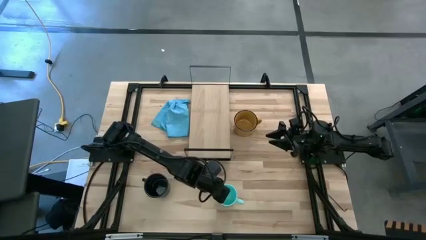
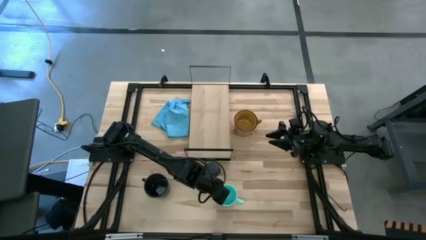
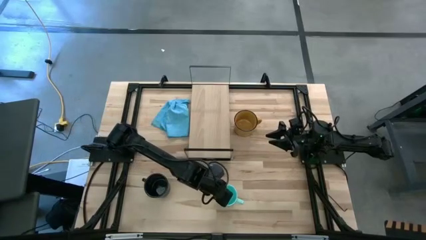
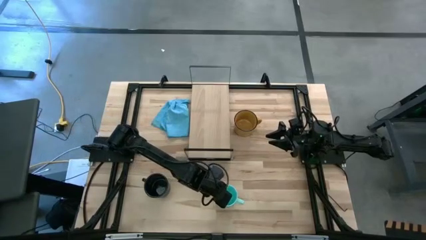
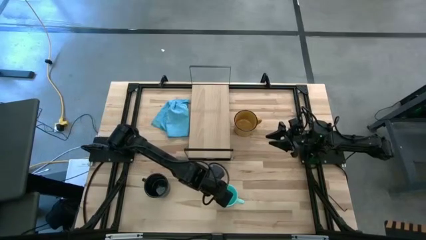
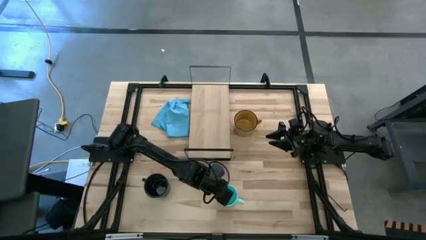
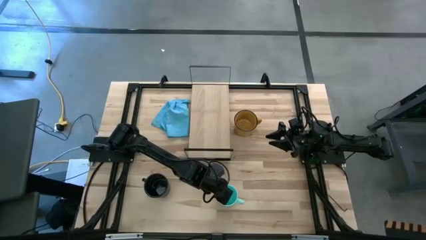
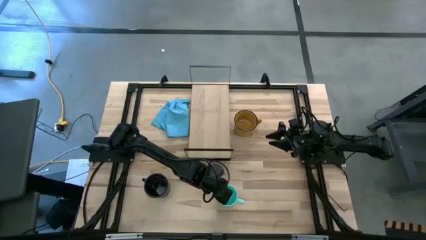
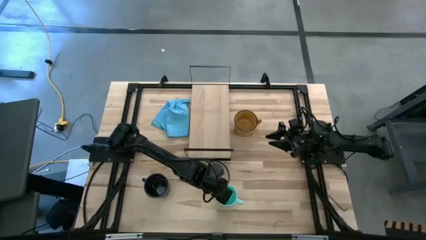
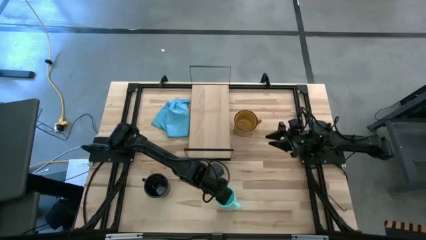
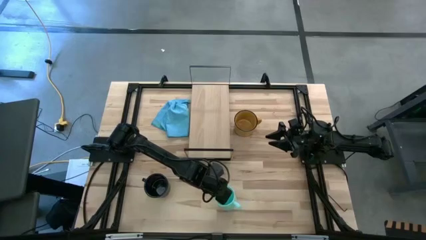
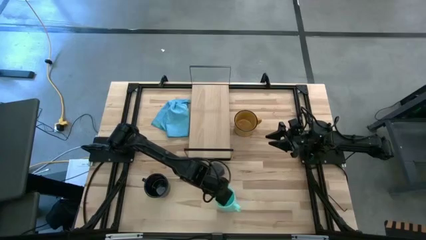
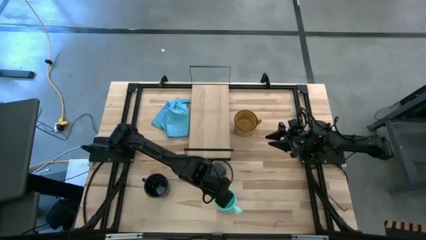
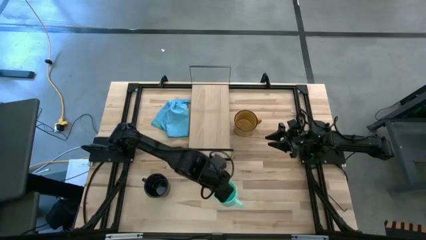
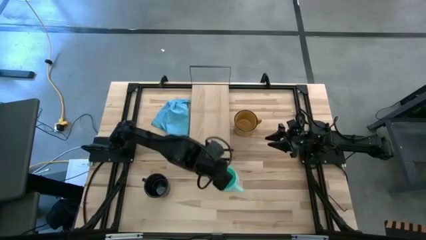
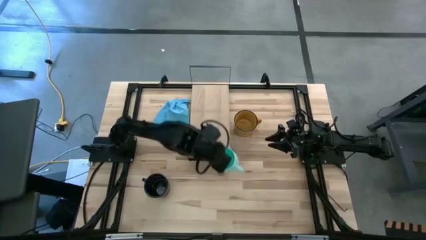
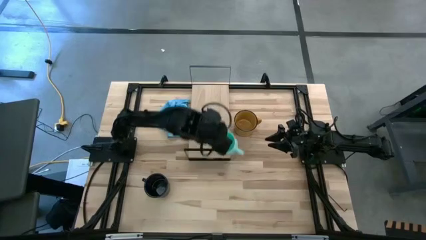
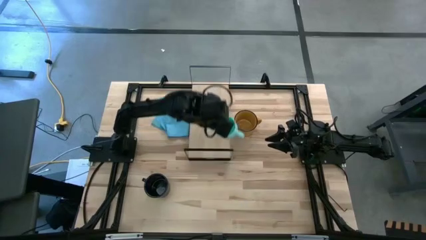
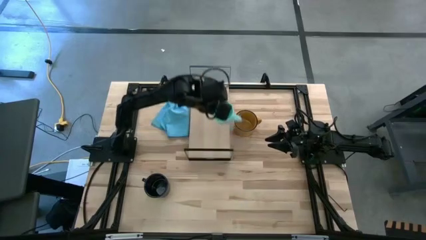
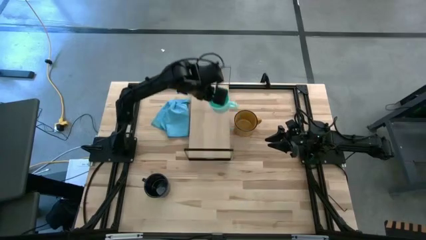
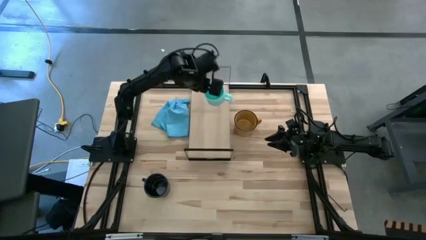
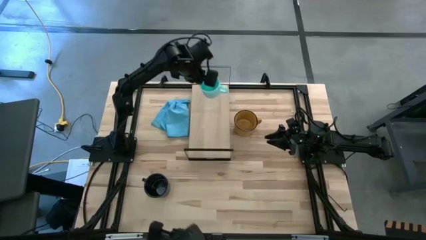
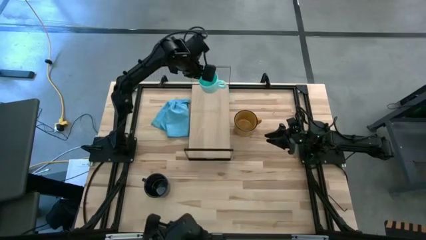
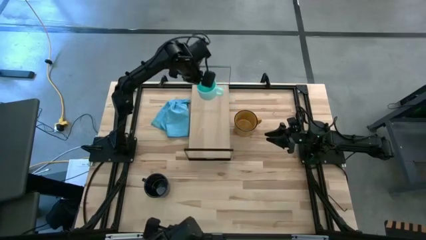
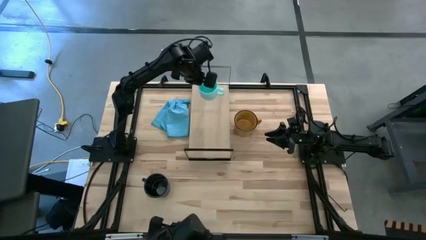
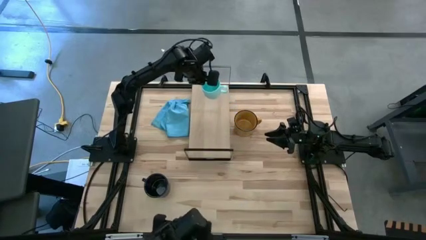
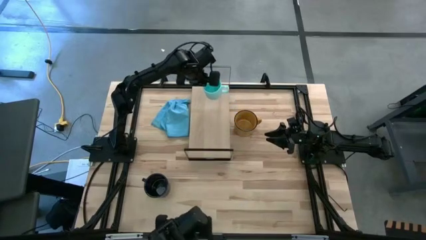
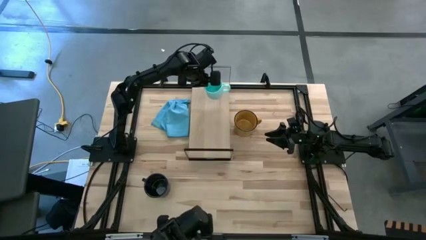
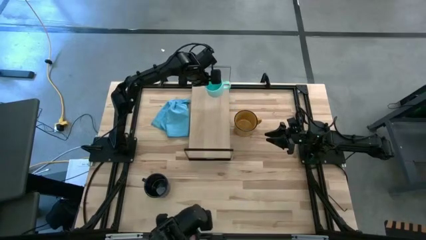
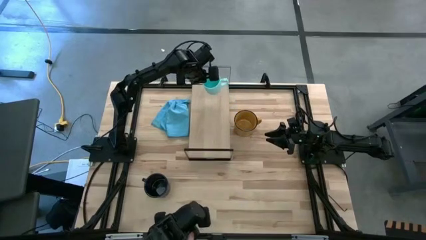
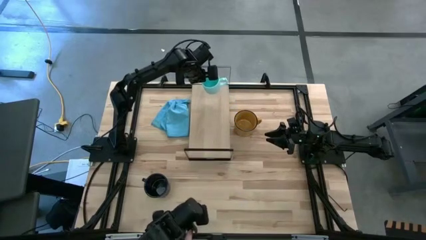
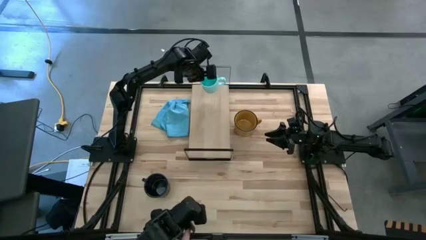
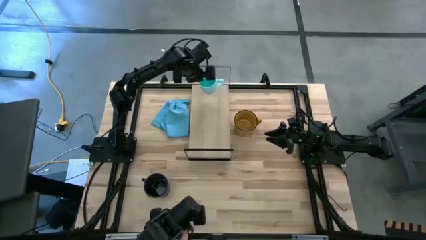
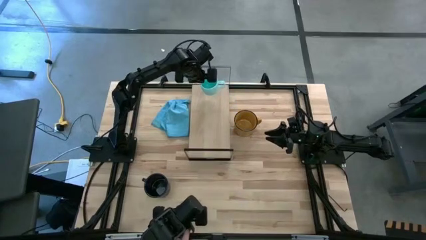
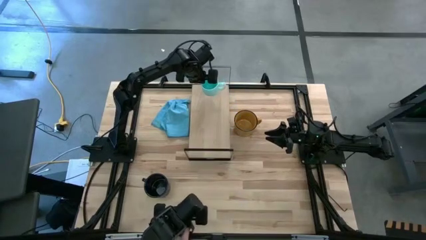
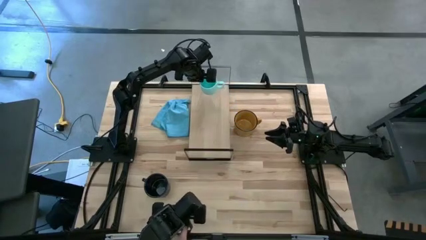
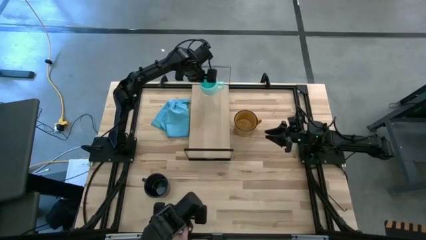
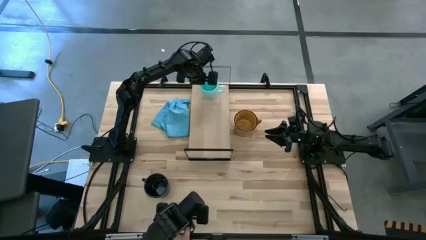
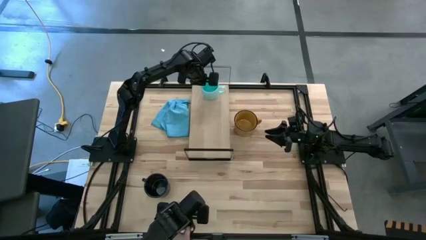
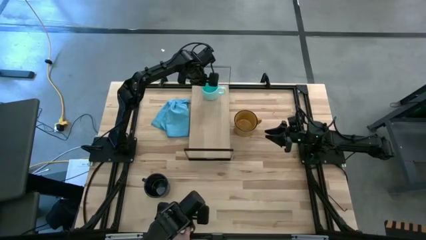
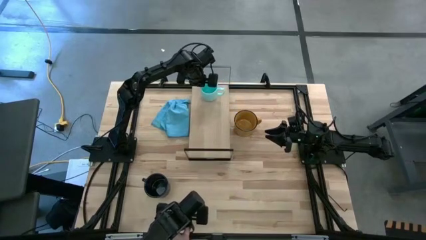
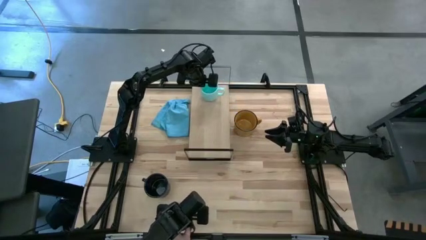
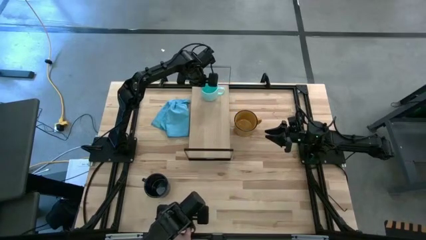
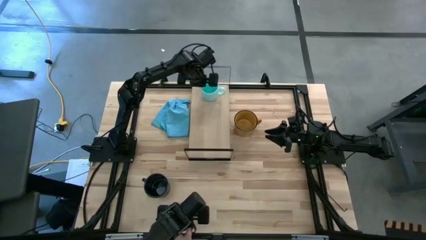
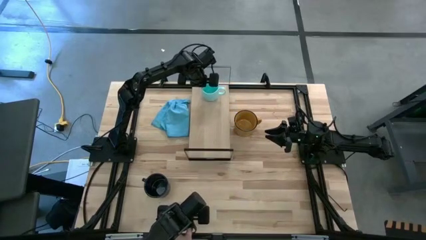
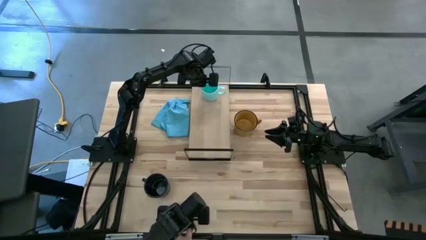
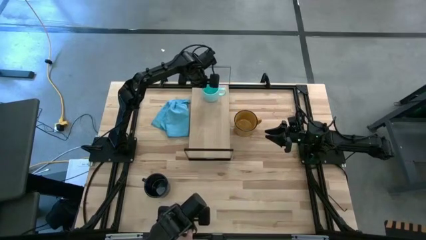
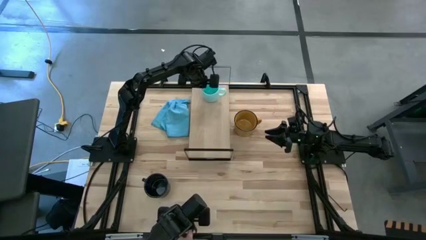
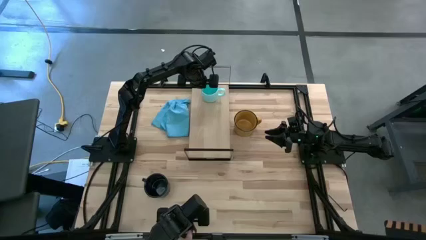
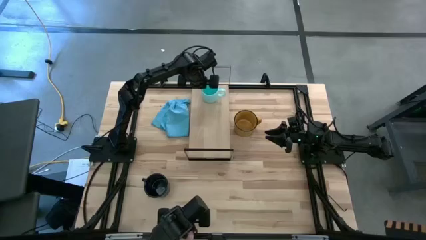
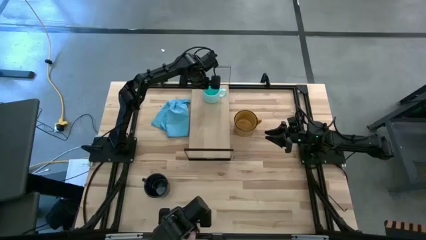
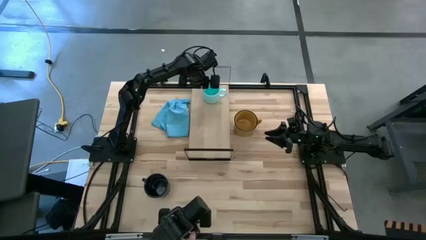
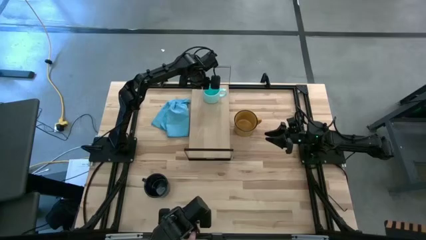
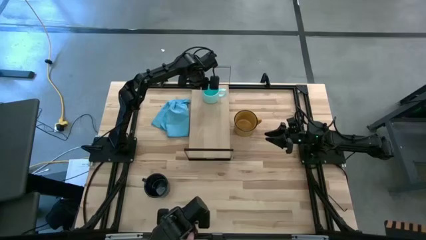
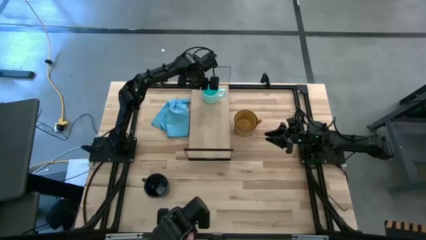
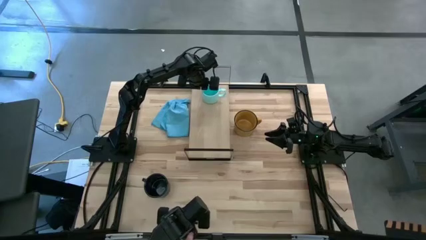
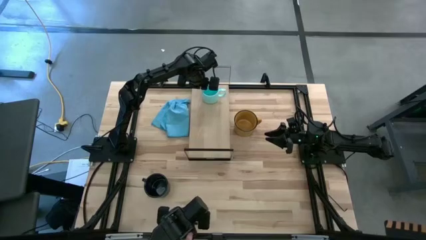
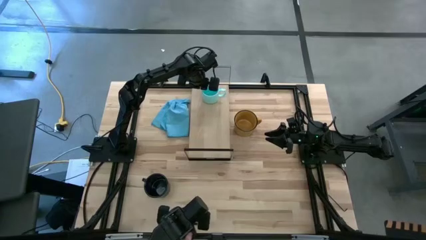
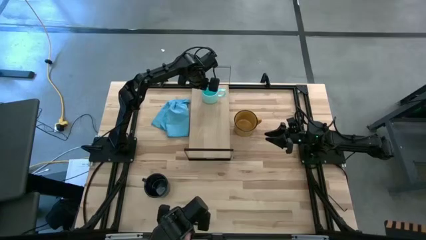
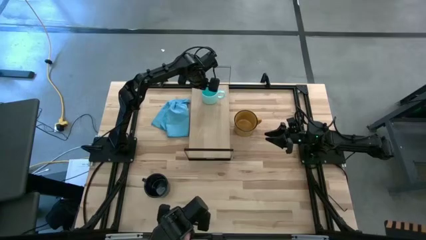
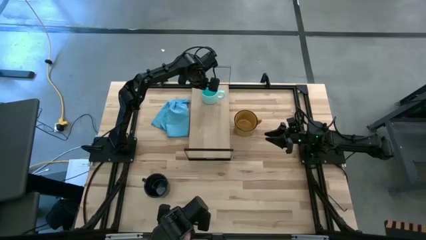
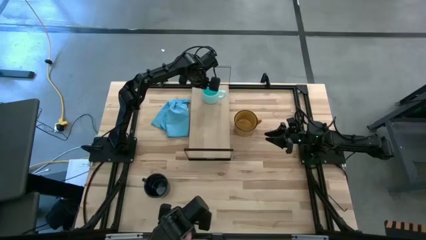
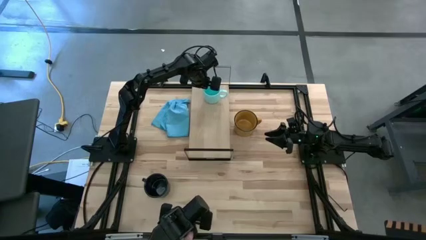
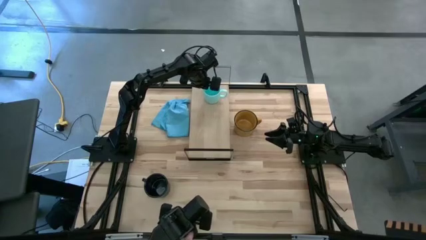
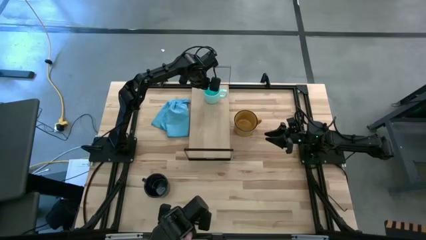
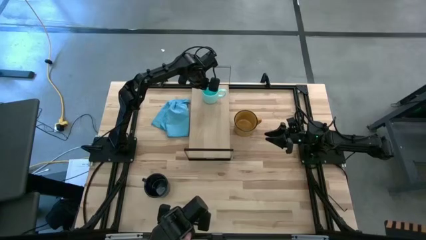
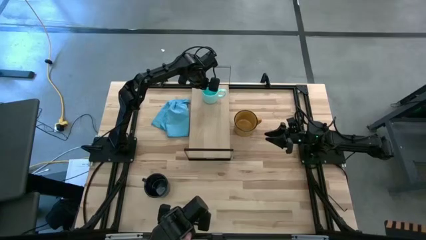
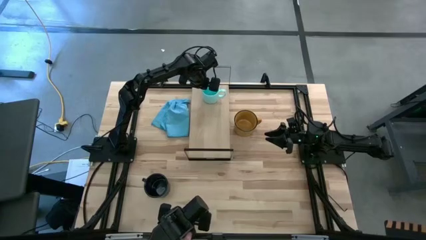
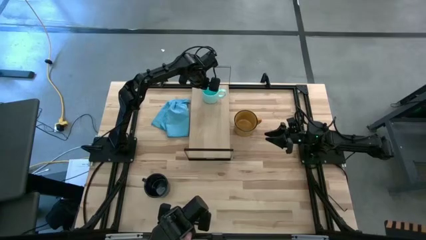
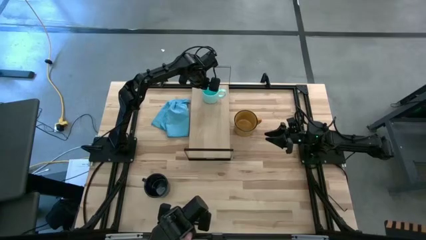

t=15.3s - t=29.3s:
Task: Stack small to large cups/mugs on shelf
Put the light blue mug on the shelf

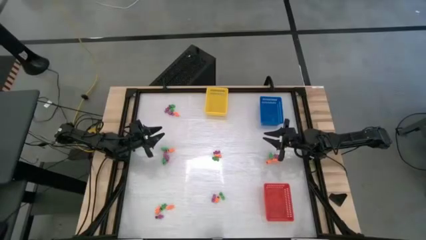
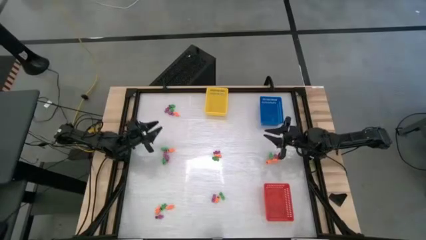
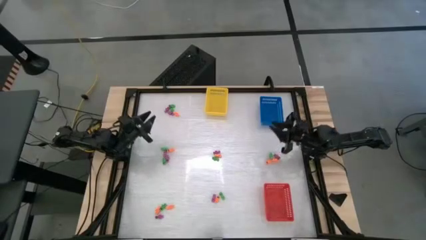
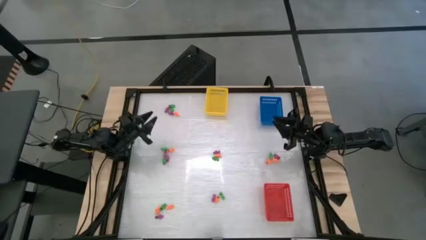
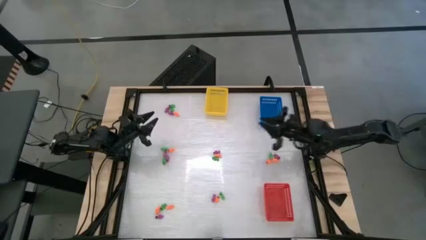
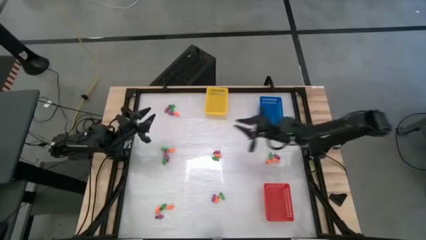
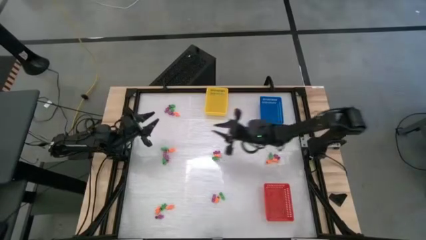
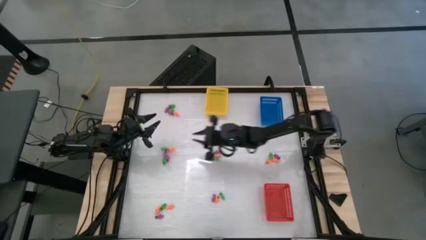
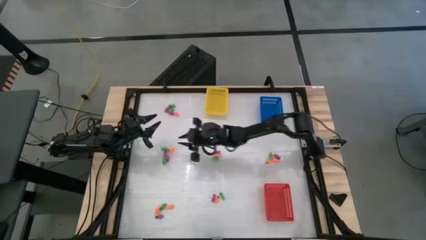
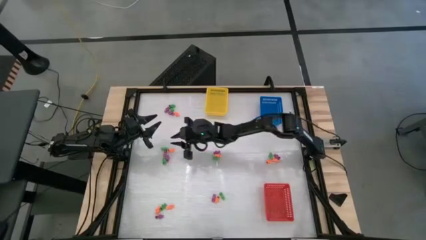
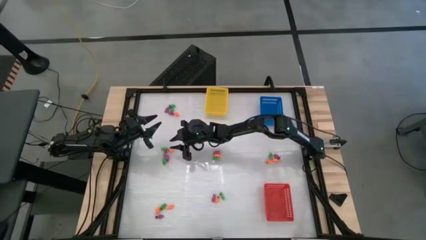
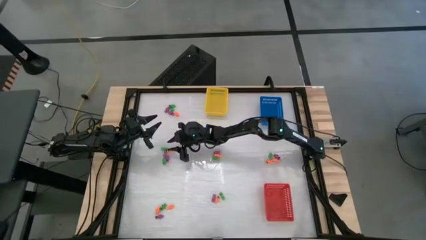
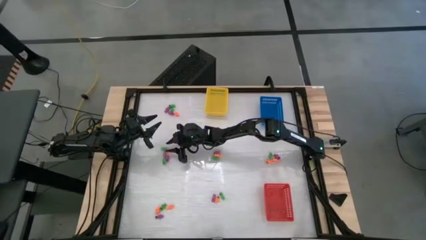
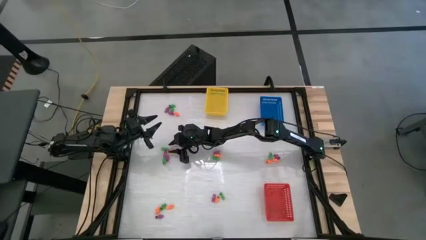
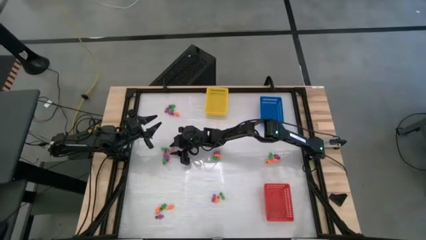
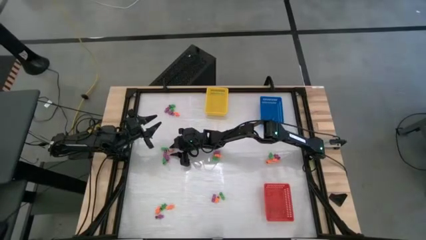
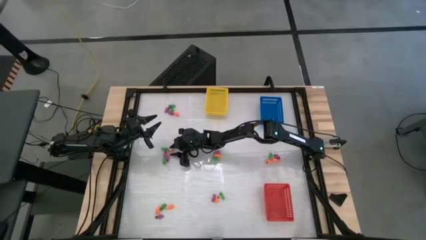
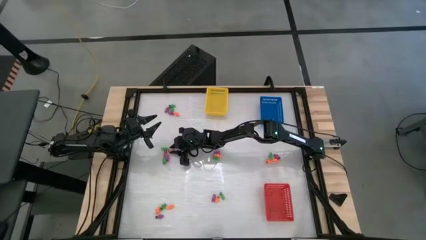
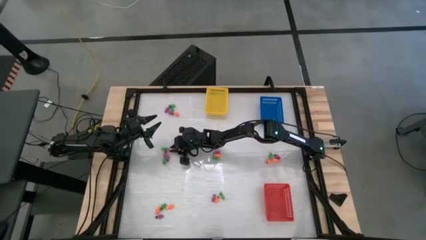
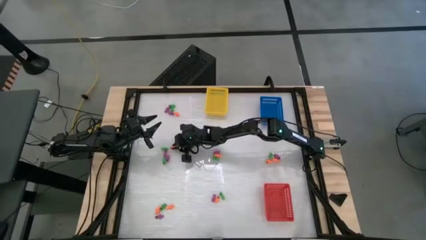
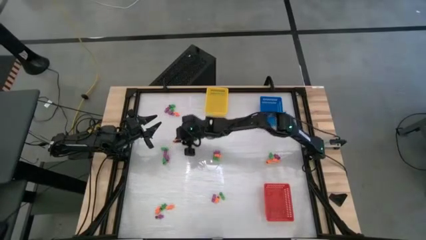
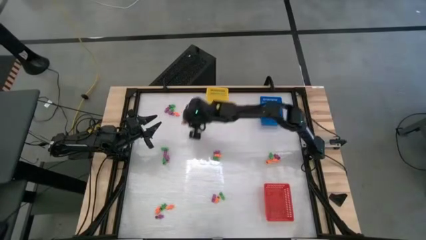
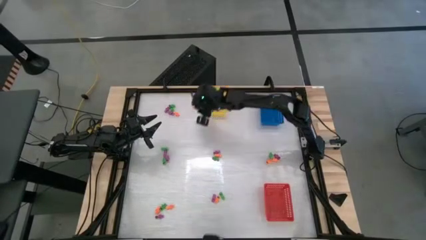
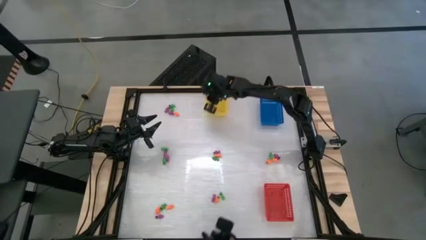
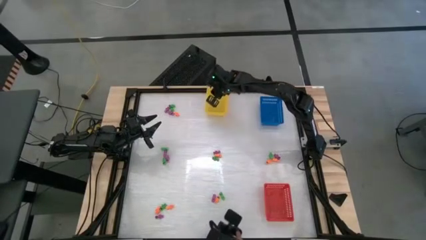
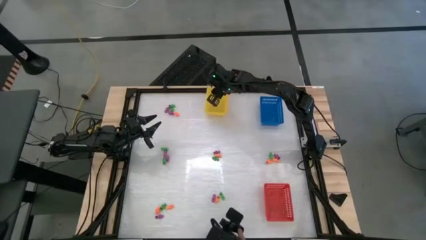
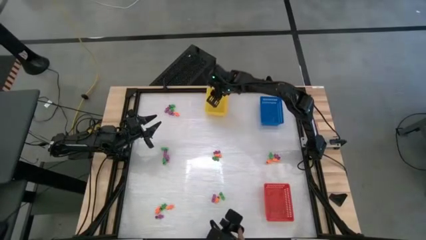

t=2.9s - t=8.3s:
Task: Sort Halloween decoration
Put the orange skeleton toy into the yellow bin
